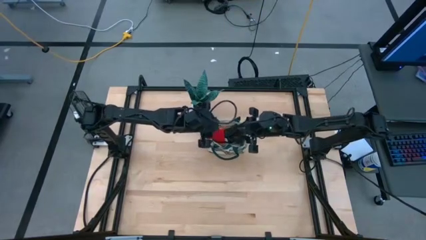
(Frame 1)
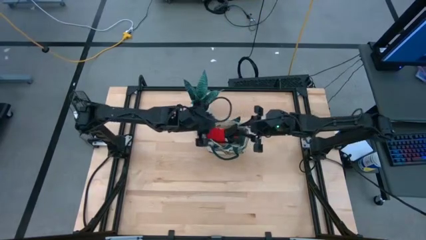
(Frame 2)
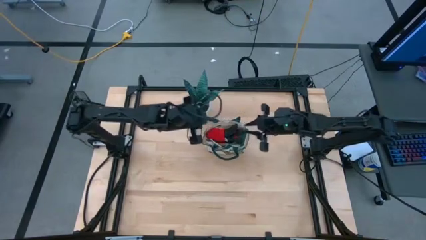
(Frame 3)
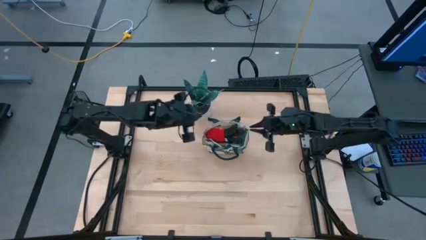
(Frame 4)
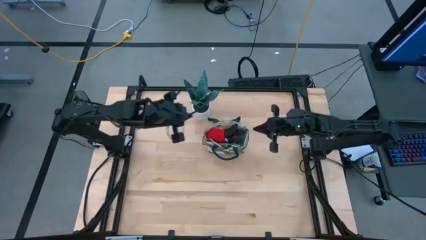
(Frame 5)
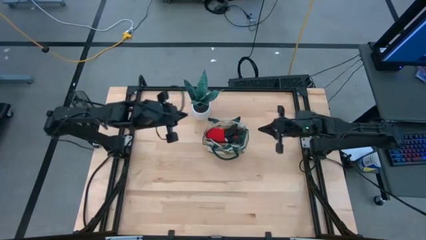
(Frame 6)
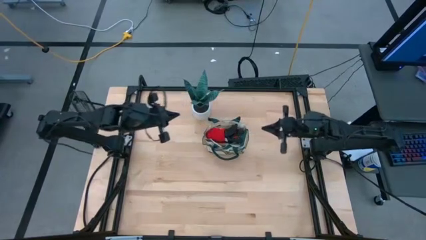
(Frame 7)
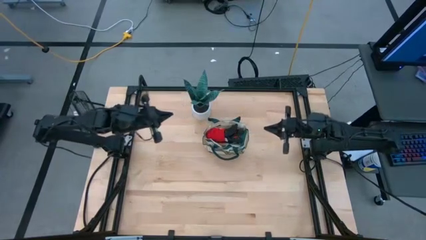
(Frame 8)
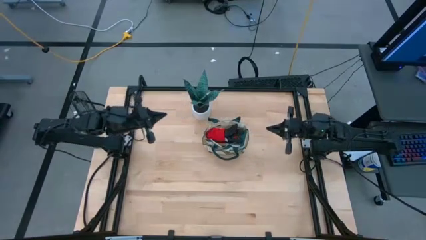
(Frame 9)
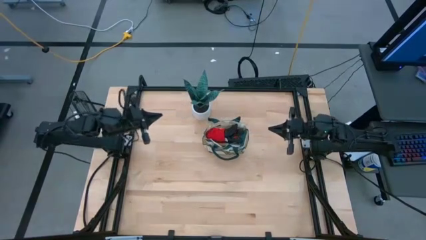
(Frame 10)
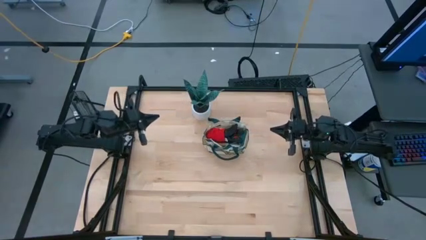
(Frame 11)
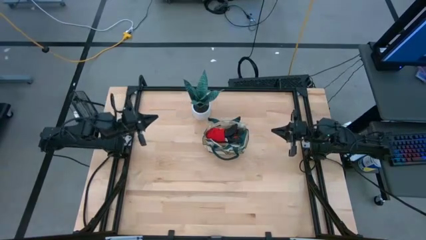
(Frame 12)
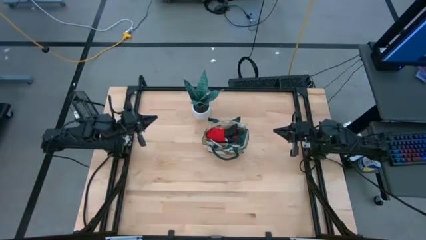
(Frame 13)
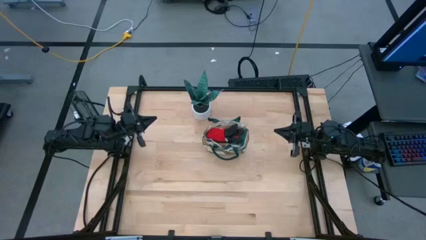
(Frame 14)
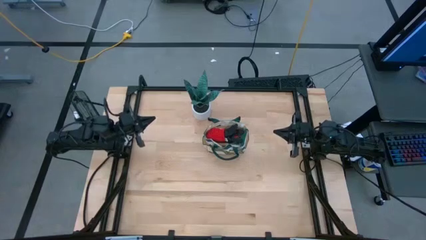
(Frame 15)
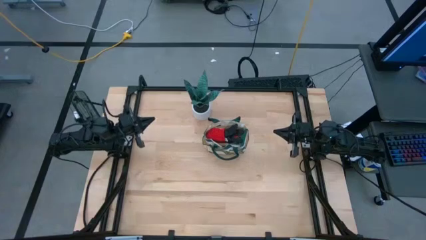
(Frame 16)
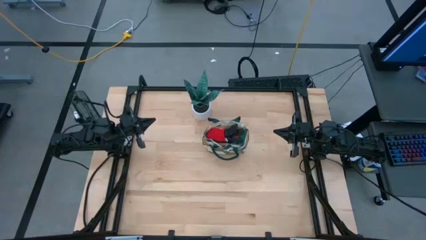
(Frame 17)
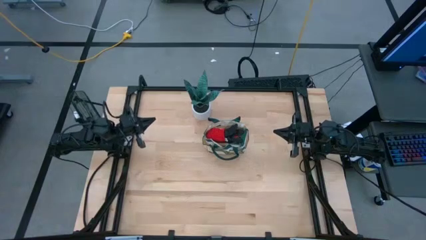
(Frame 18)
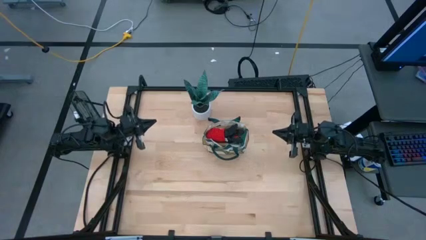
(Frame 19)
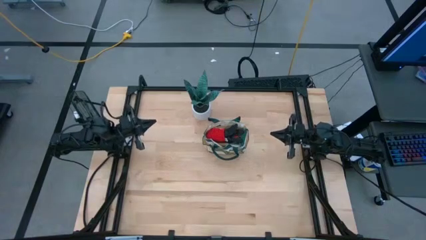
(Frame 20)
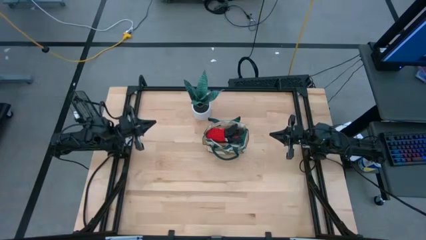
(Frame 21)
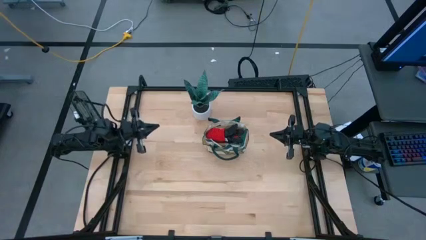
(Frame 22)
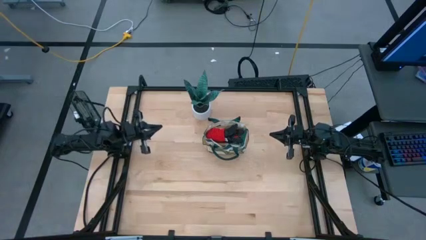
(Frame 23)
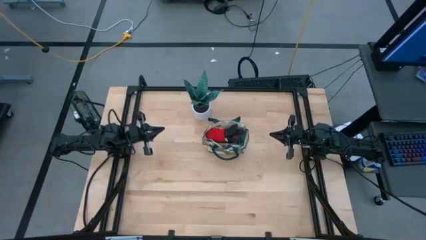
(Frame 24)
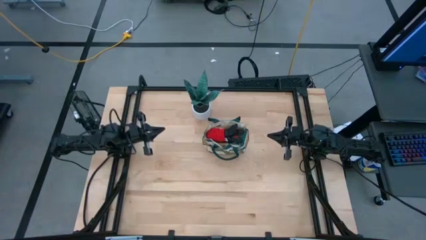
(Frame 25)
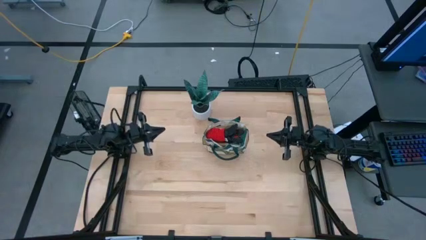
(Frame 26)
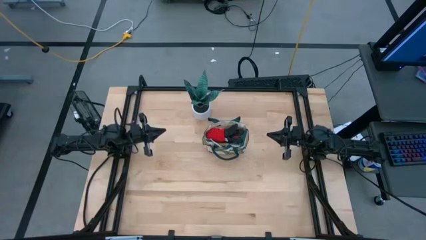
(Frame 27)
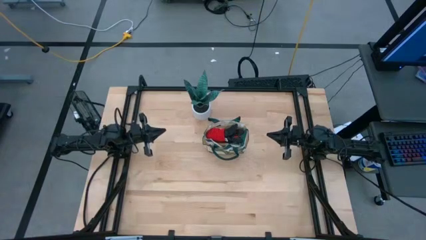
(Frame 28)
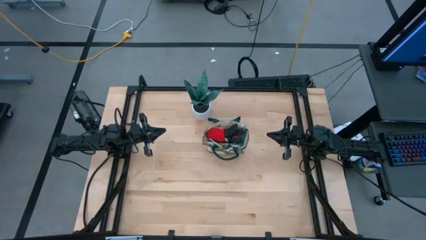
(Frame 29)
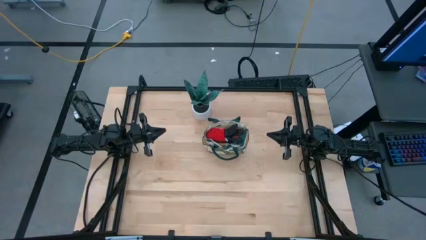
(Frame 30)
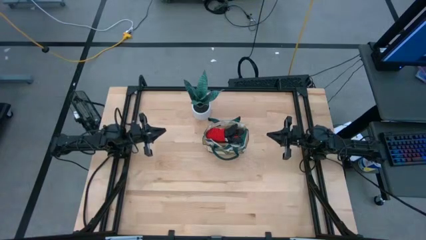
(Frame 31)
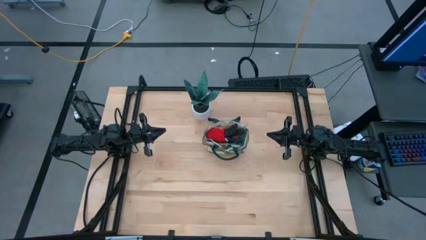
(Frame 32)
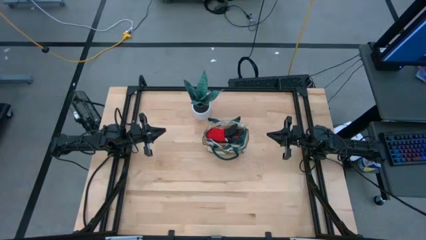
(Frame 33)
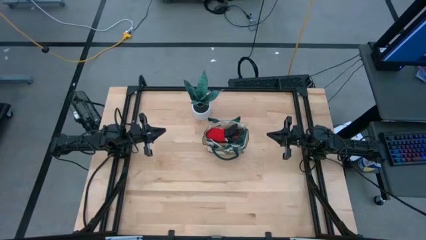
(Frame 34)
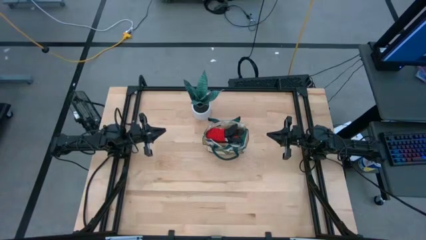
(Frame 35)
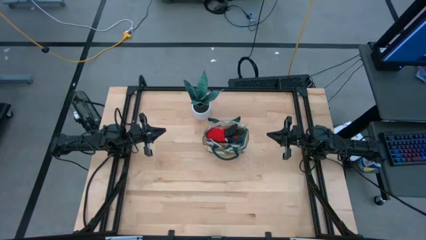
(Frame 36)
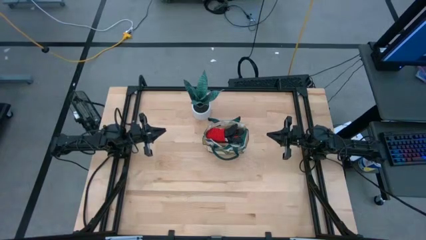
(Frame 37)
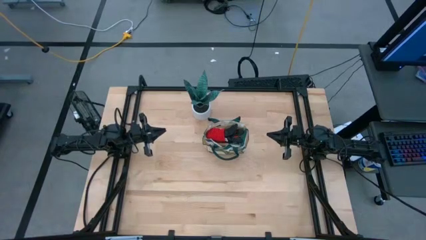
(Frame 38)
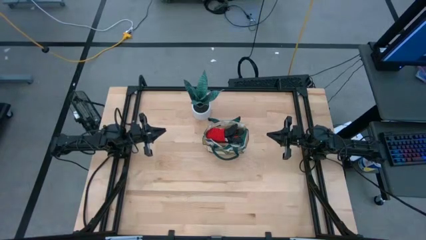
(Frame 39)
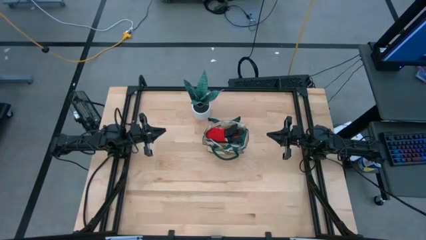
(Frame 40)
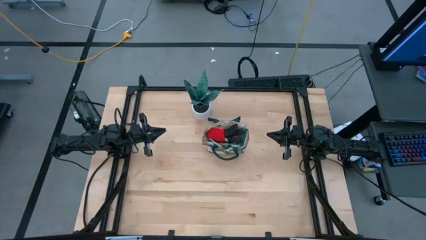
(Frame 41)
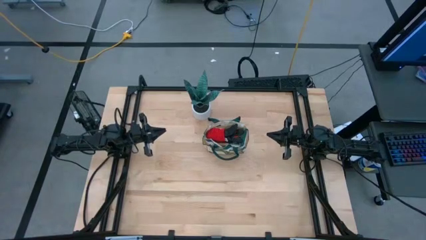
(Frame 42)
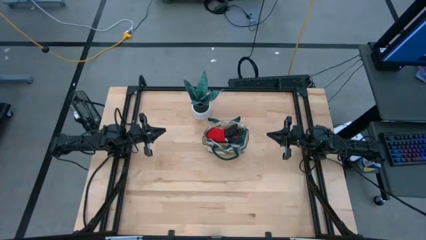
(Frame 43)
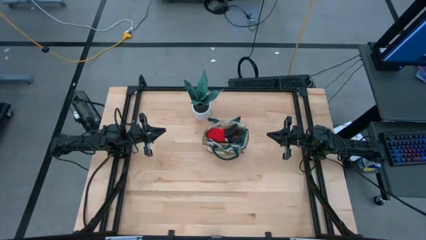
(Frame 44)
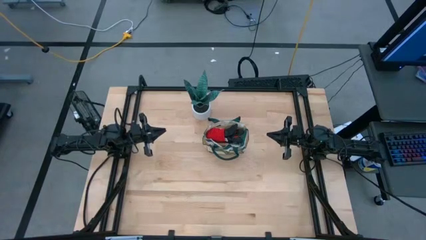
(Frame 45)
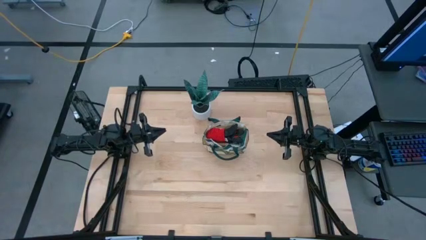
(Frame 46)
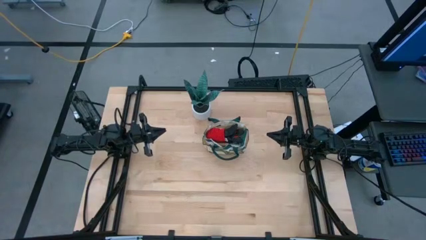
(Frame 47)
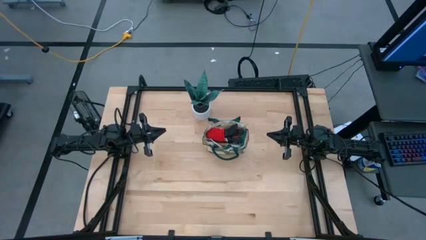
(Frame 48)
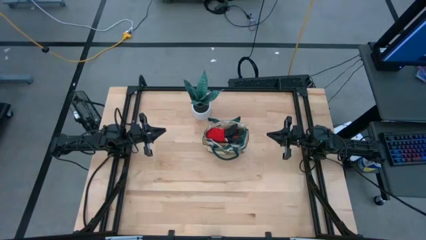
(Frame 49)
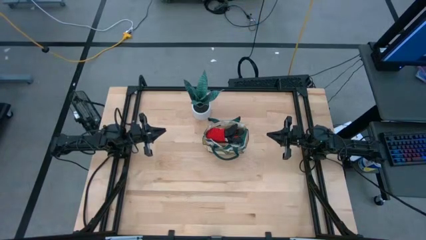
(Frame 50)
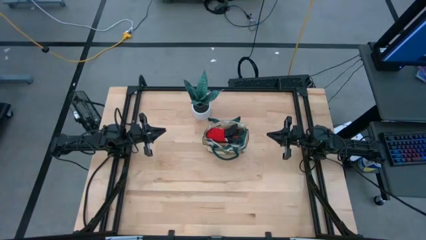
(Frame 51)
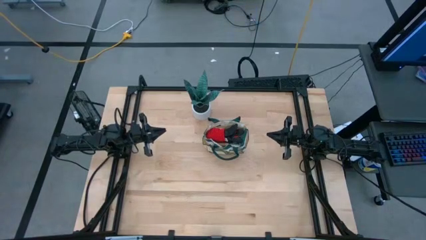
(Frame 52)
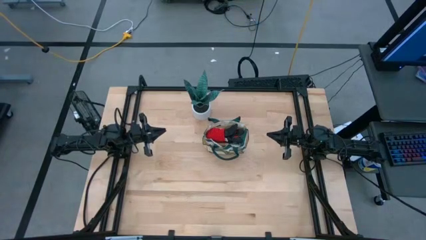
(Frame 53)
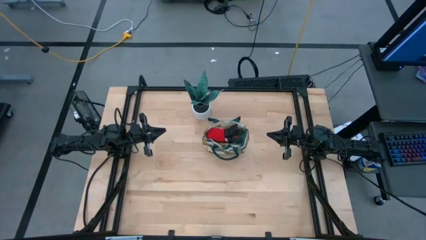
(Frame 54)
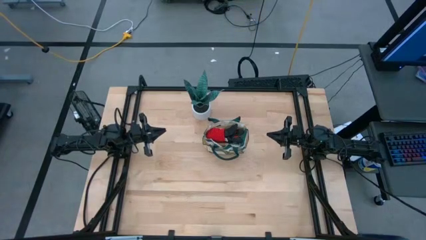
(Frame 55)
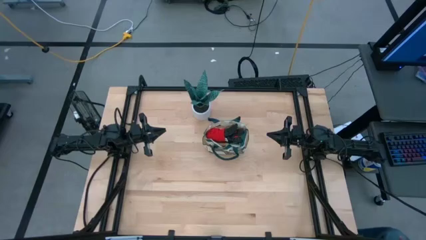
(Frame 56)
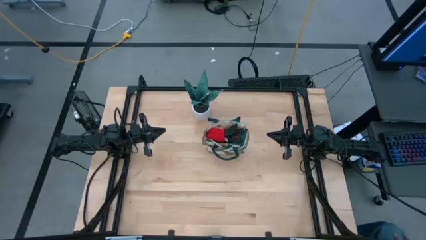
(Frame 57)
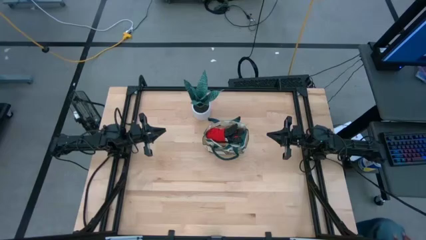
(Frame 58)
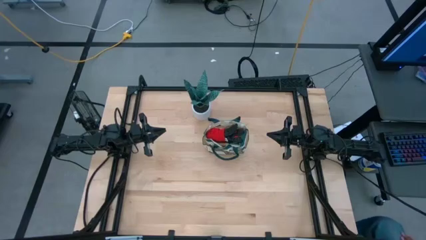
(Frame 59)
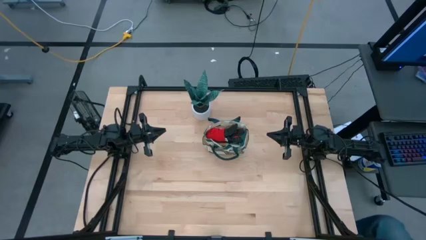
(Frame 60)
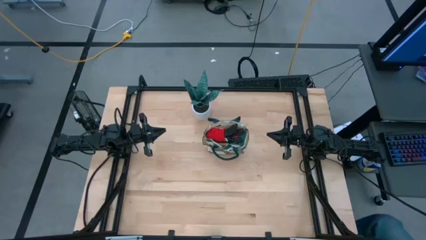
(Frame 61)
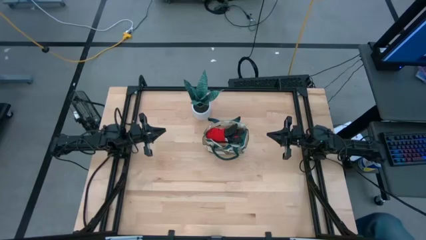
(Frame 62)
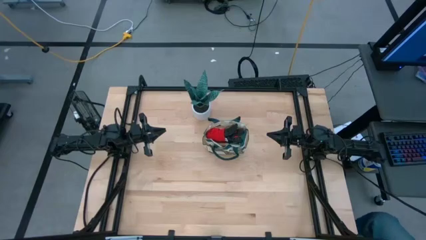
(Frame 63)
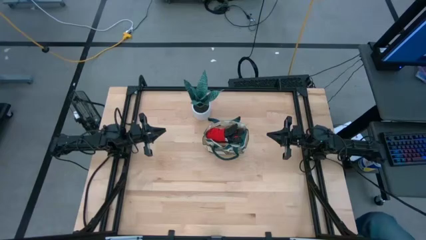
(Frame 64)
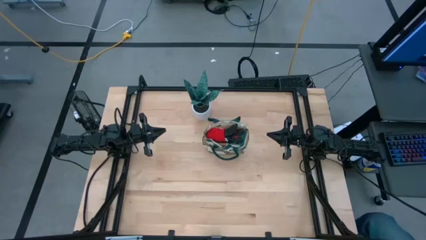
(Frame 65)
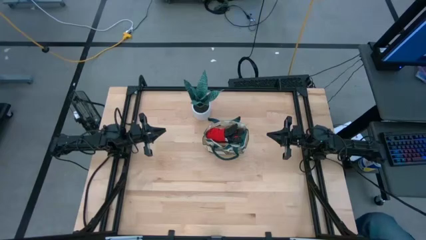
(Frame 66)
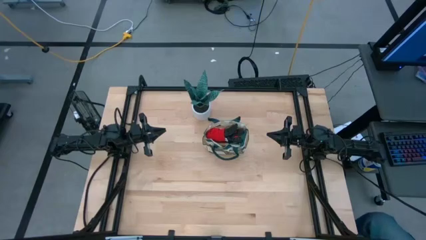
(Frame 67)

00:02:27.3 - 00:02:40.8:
Task: Pick & Place Garden tools in Gardening bag
Return To Home Position

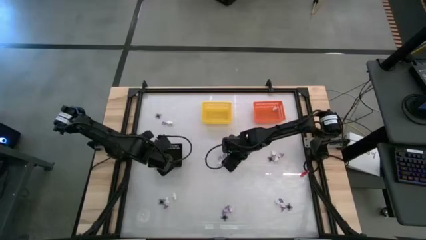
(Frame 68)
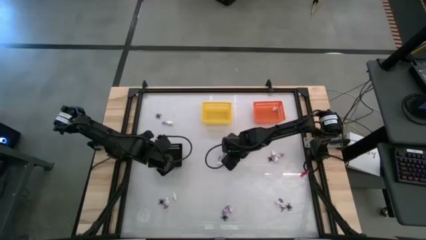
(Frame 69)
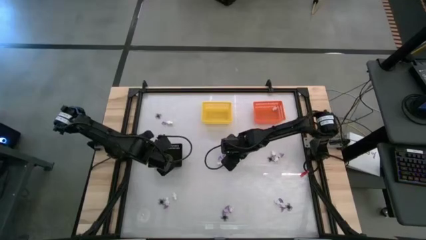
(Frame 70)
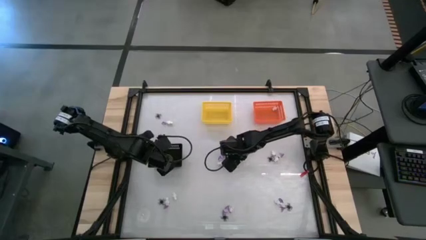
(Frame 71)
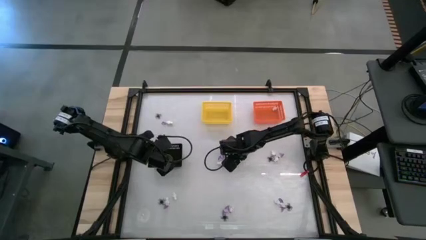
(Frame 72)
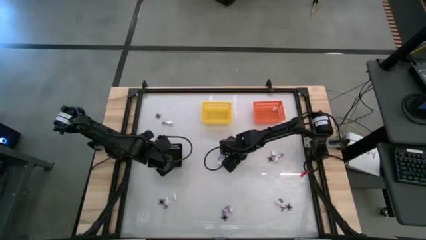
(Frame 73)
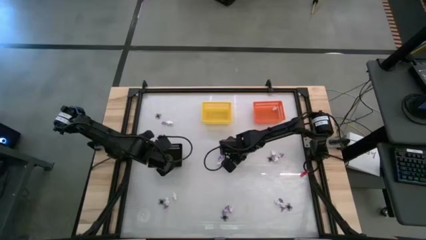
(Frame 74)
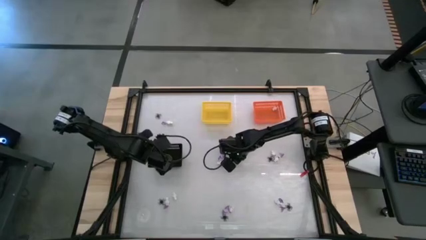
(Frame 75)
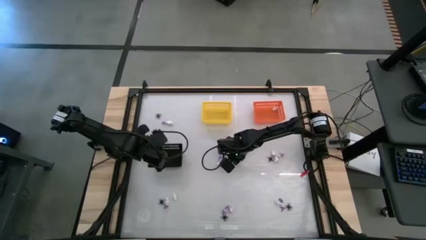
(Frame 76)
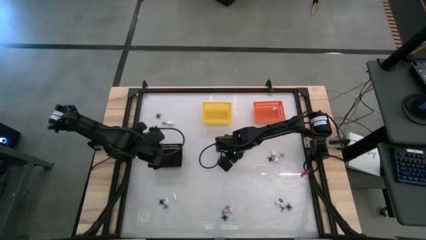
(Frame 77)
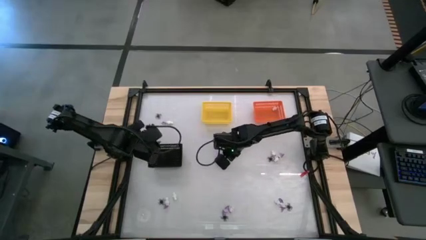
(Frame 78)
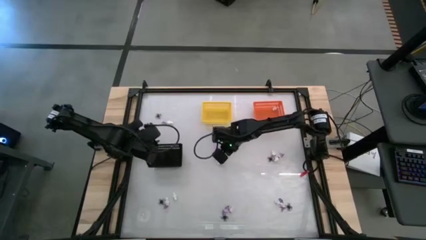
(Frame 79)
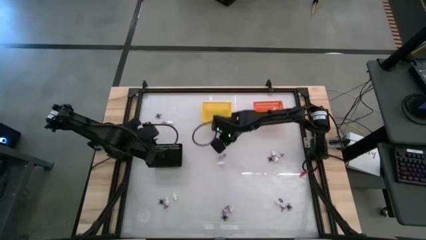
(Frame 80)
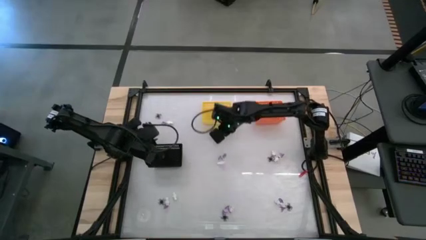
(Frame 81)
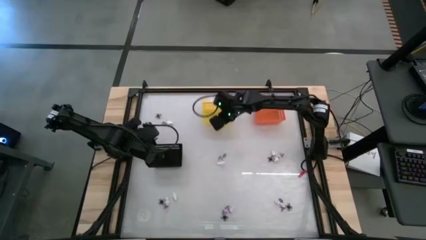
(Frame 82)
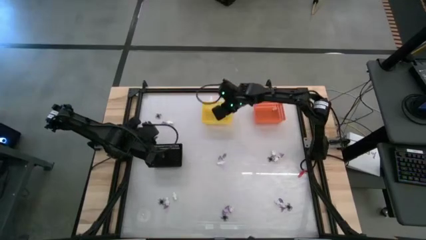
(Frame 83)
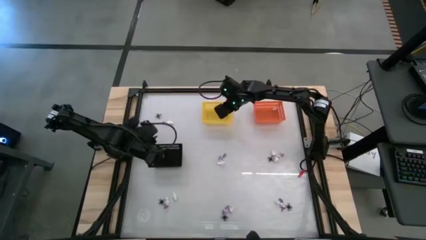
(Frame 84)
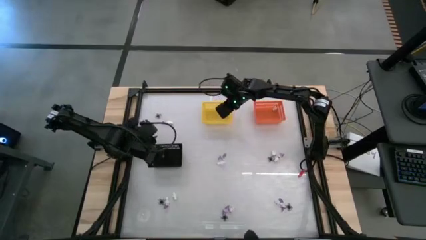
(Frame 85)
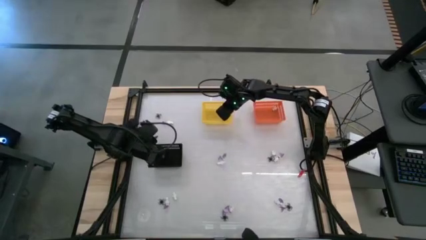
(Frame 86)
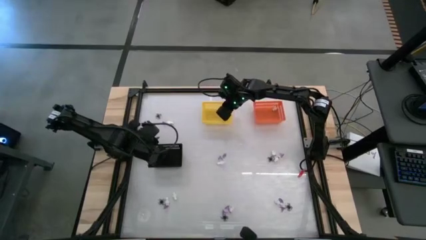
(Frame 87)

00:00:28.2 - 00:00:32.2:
Task: Sort Halloween decoration
Put the black spider toy into the yellow basket
